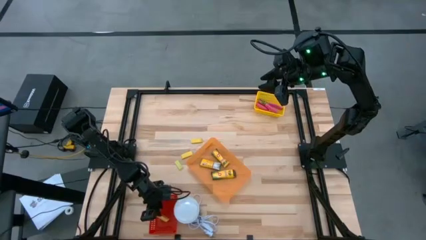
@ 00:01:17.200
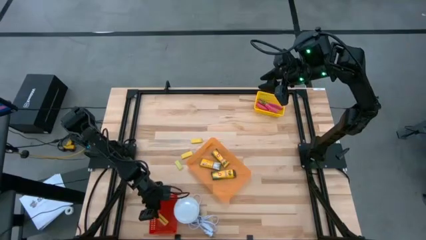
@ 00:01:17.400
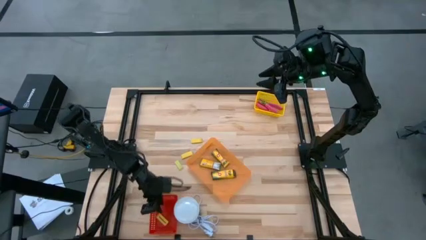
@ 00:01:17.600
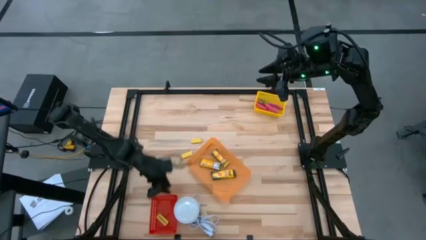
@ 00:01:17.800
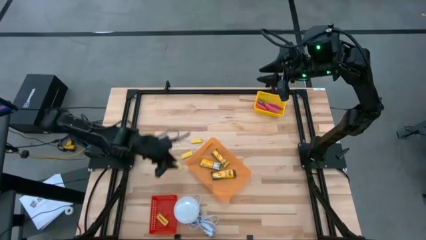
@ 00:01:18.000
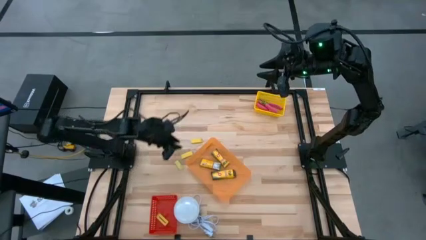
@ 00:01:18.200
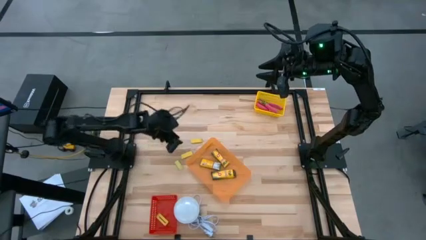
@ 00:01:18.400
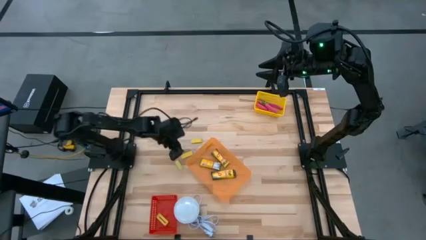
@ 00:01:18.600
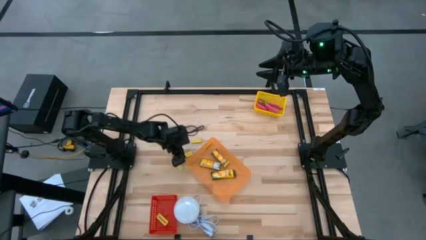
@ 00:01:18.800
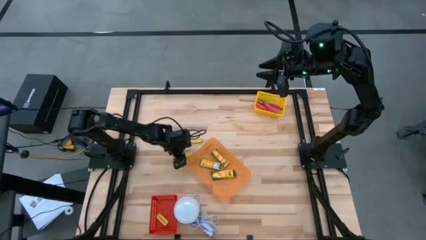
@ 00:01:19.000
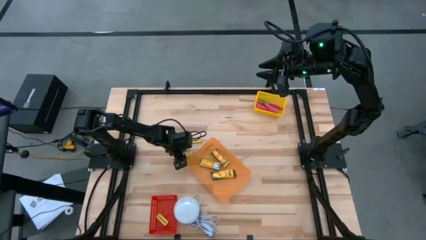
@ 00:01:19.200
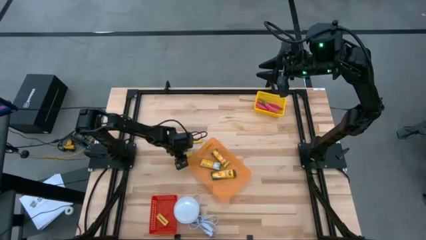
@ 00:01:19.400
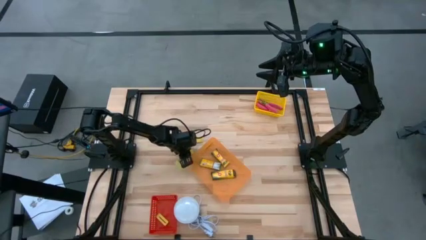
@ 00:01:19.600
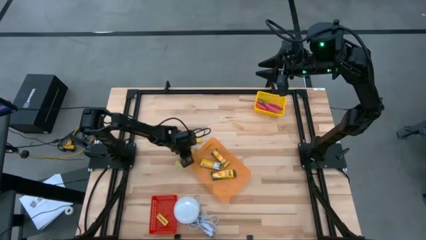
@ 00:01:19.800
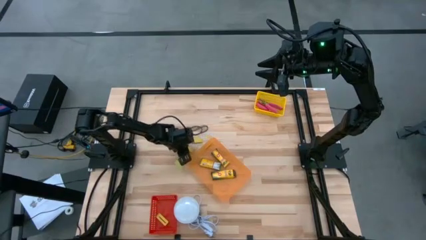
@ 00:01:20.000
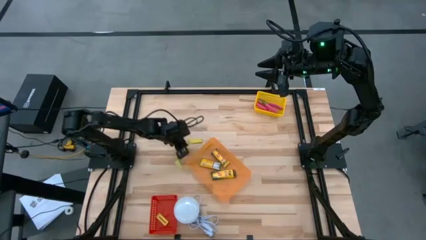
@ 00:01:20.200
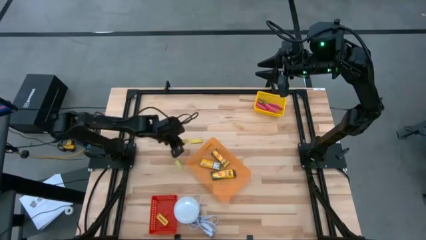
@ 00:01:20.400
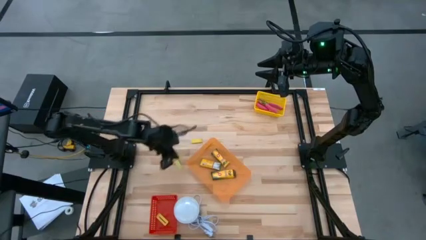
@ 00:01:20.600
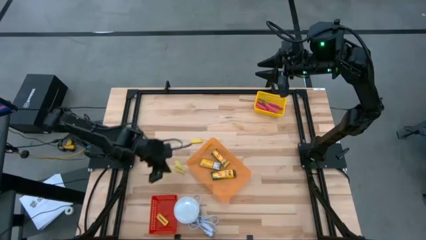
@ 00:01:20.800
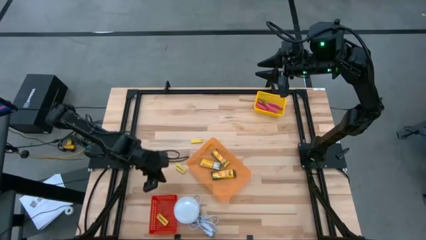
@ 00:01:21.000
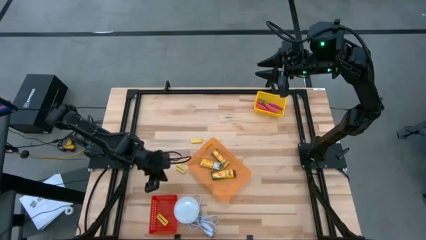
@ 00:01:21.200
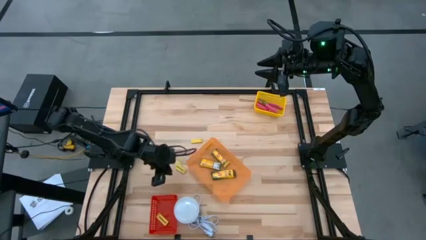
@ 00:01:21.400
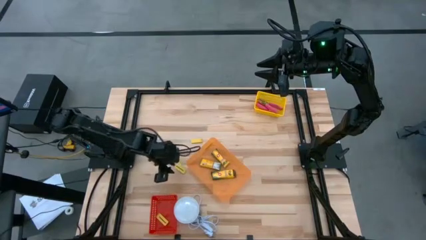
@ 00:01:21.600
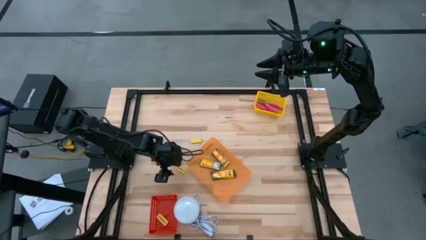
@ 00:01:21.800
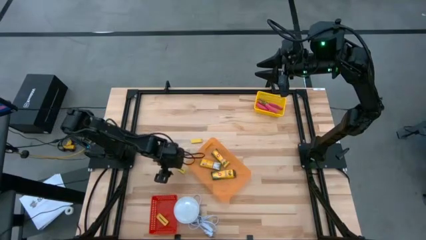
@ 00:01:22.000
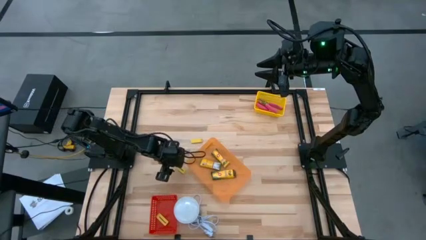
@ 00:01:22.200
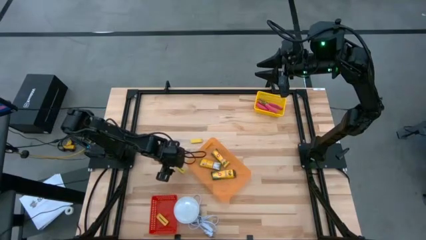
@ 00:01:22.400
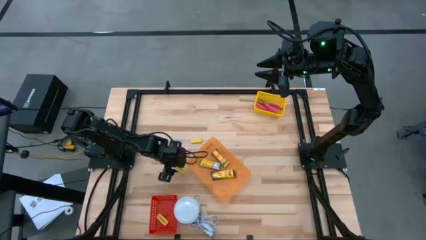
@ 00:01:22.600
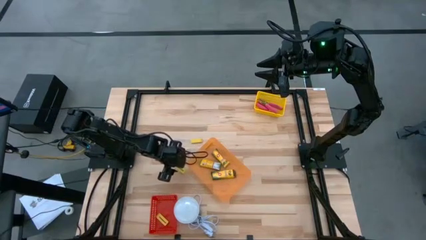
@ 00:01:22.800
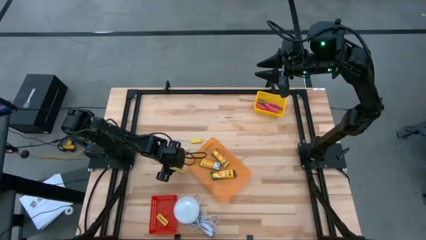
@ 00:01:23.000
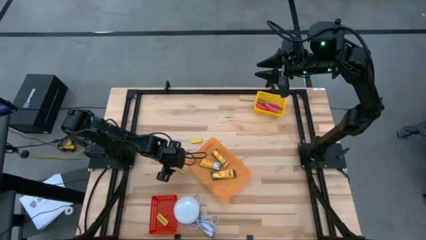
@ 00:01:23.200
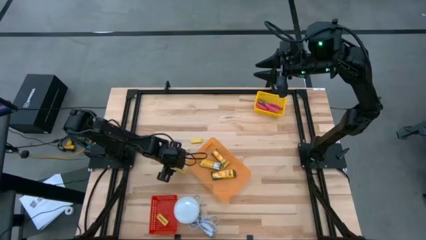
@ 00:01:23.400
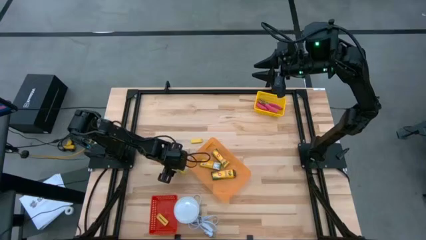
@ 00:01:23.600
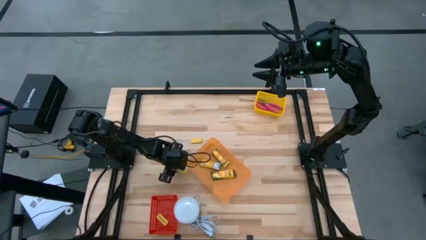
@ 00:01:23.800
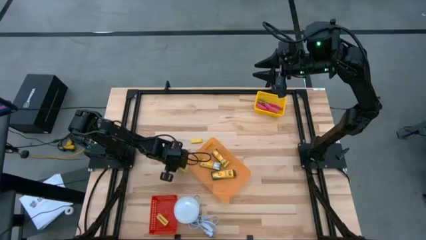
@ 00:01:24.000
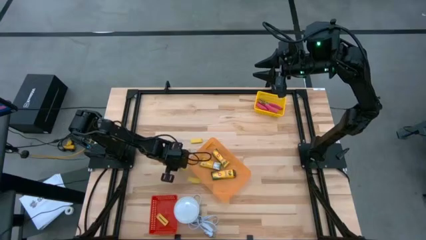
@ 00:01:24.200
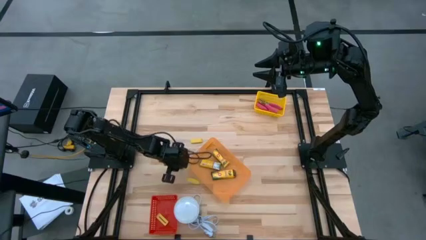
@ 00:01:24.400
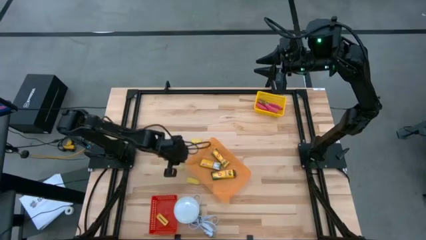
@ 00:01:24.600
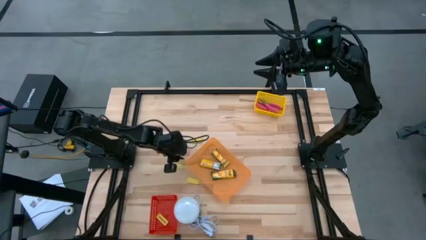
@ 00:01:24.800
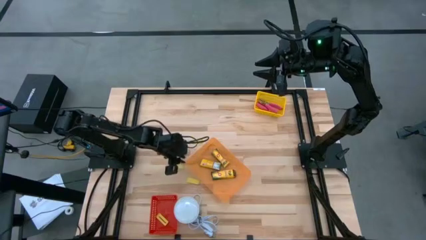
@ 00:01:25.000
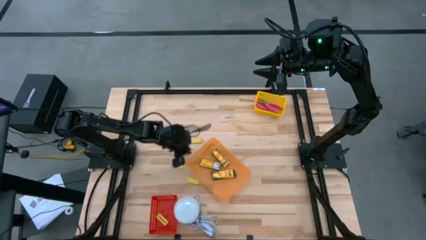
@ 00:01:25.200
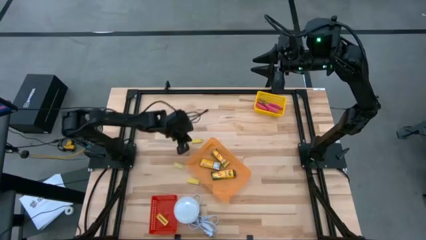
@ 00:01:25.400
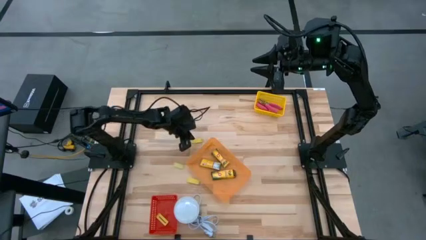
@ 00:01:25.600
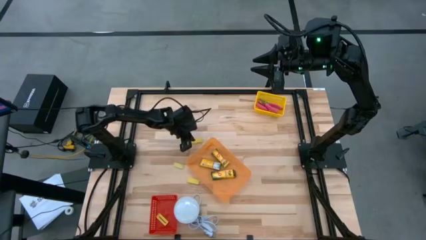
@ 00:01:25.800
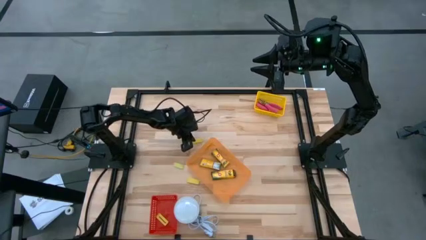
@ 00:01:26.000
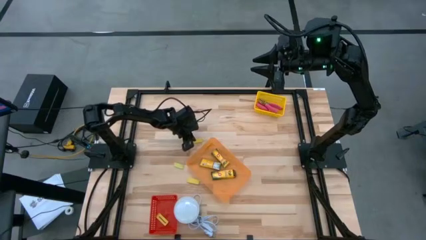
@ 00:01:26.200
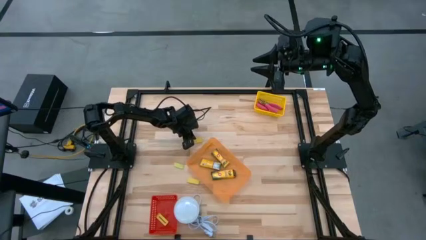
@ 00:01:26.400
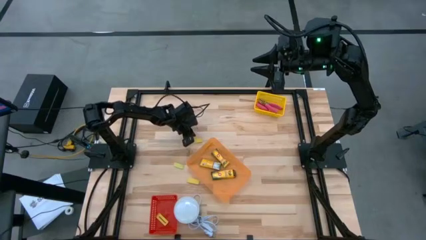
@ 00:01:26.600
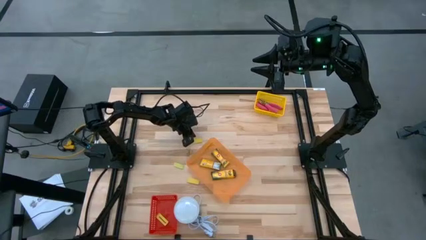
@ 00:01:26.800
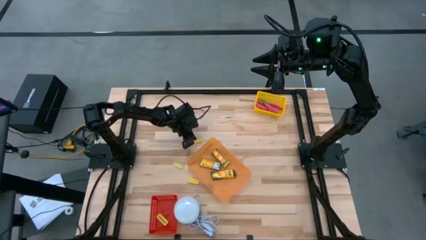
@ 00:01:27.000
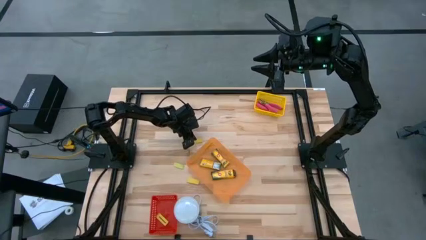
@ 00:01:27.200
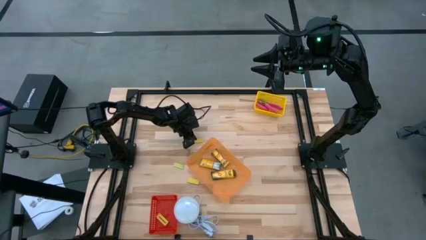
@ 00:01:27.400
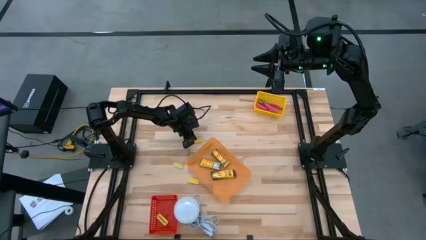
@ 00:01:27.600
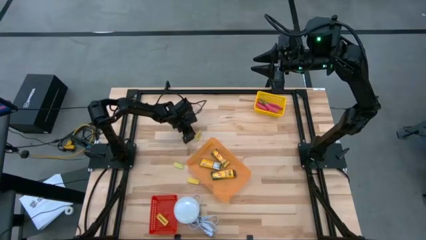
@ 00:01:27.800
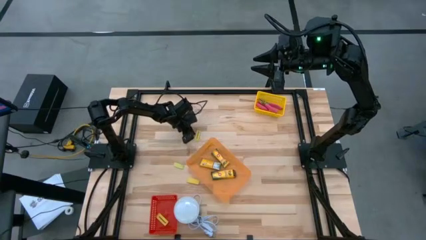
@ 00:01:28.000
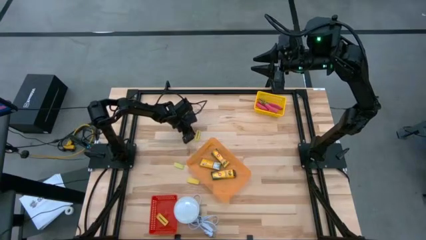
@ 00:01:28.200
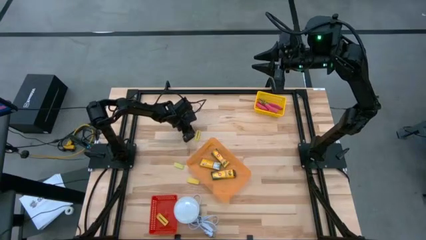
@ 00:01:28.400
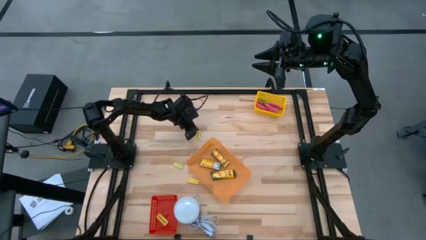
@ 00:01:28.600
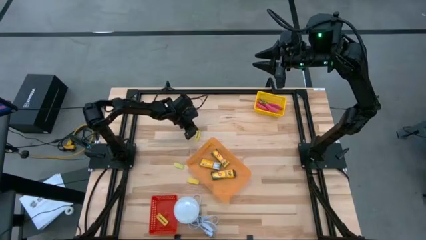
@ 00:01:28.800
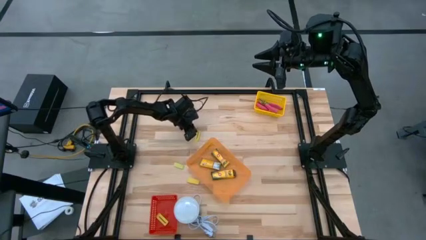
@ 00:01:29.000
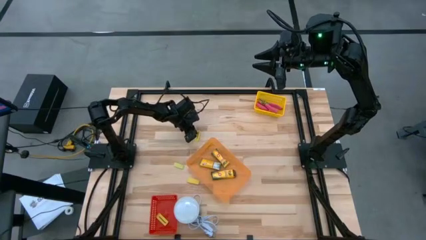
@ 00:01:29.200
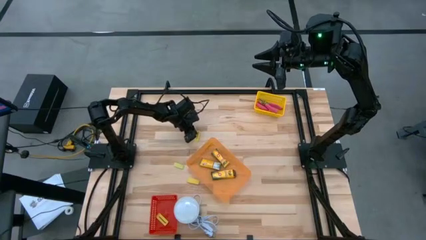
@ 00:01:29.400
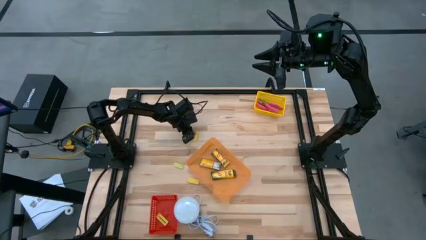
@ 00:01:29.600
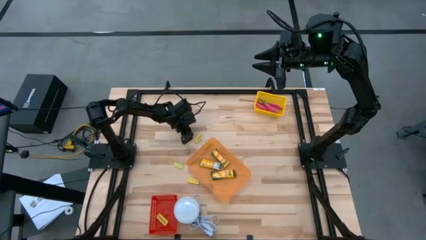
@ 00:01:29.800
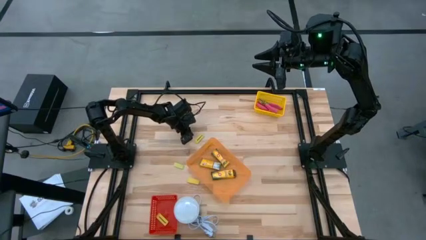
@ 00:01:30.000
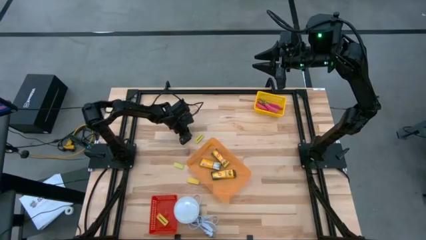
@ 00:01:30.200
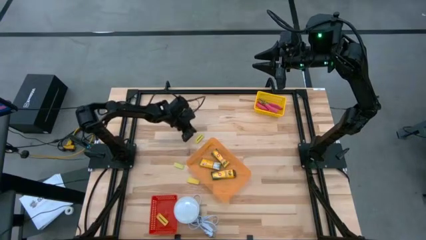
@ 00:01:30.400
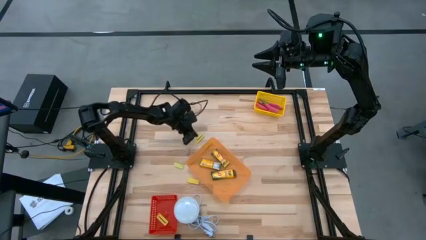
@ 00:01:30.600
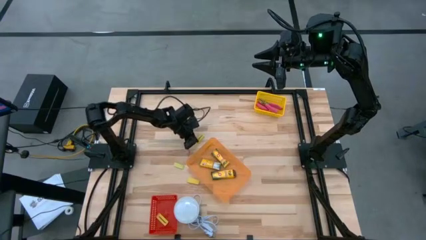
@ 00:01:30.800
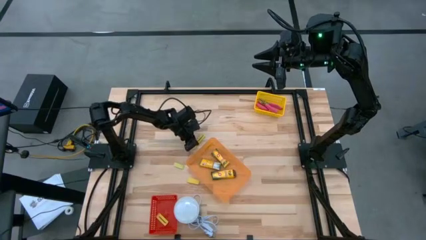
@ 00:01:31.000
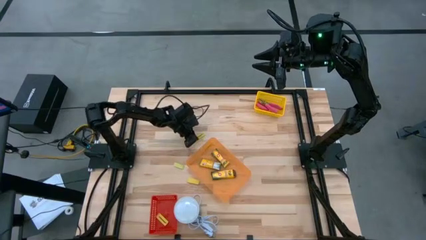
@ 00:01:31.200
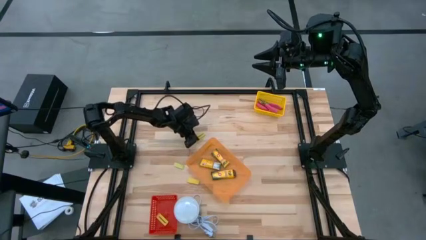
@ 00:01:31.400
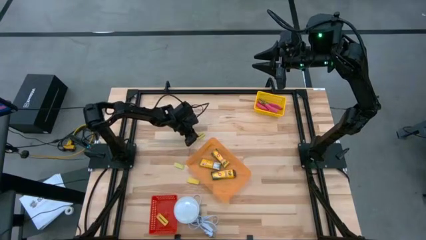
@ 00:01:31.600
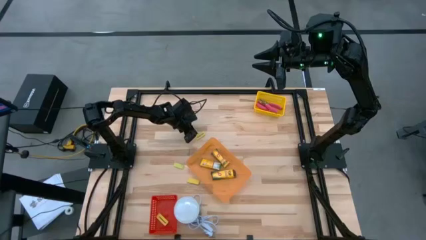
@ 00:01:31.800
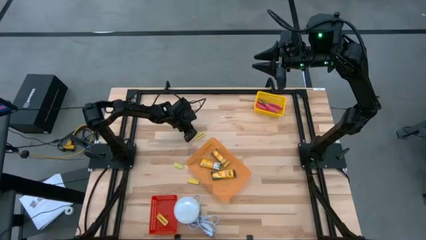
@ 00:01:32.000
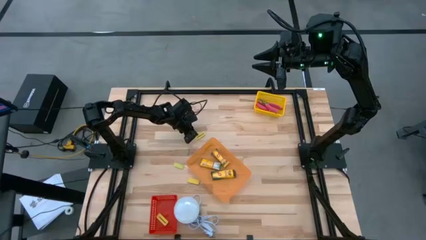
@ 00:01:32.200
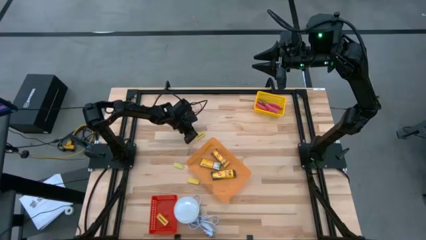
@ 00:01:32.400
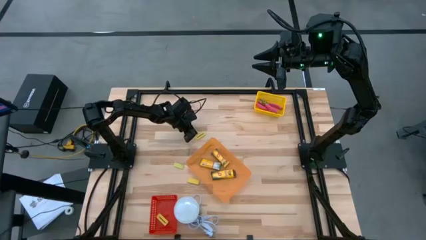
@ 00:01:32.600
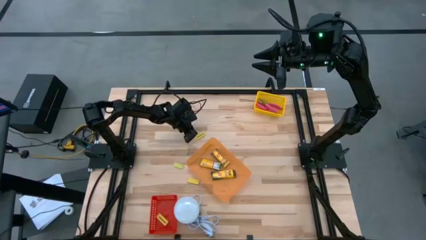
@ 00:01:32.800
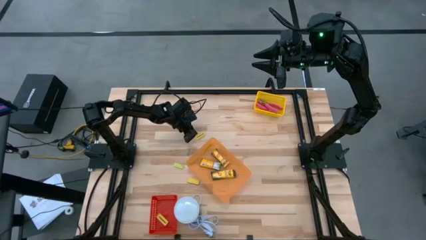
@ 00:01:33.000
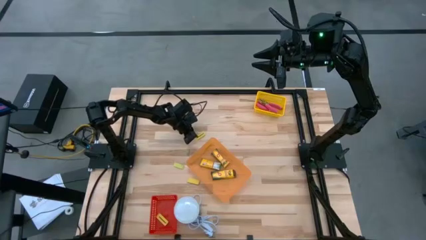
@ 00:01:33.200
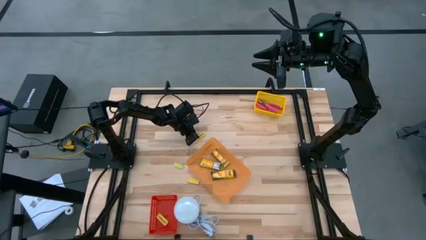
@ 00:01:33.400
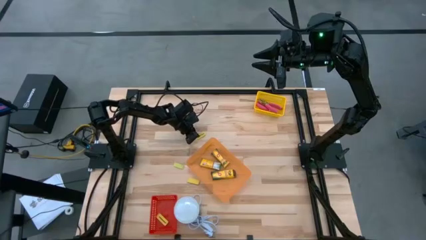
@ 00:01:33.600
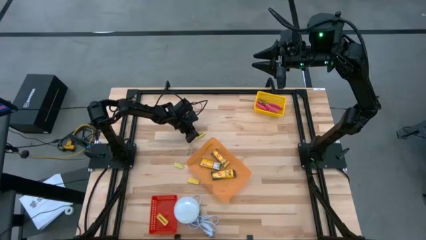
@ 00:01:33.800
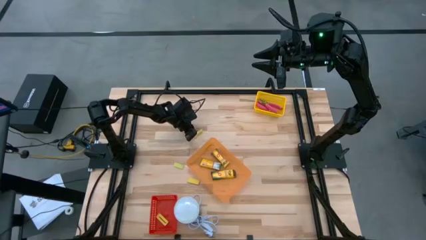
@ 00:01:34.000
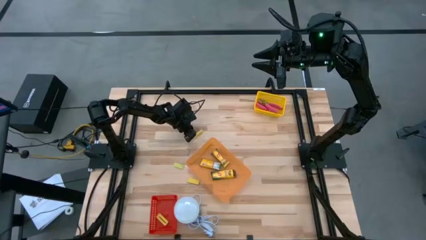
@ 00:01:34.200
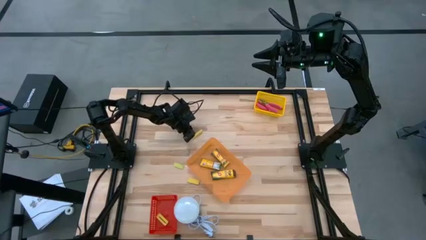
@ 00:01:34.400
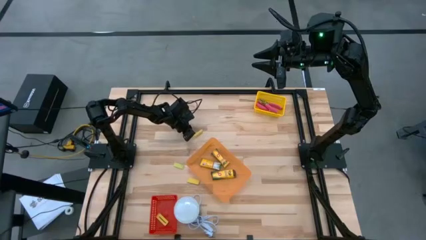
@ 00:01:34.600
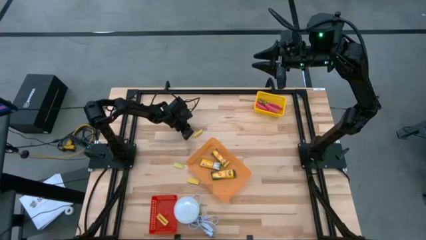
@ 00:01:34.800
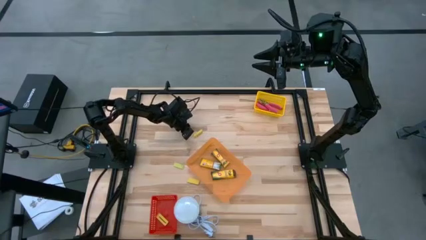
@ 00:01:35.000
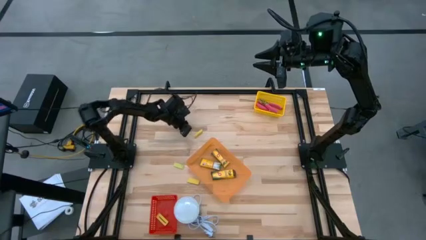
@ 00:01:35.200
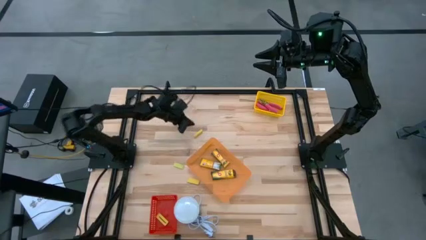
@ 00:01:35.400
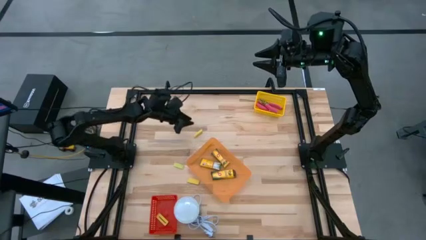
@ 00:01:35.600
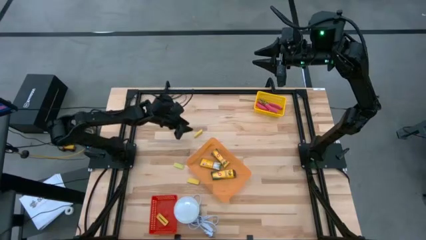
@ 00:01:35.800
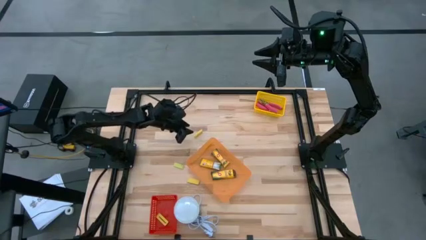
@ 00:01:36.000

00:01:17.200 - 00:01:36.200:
Task: Pick & Place School Supplies
Put the yellow eraser into the red bin
